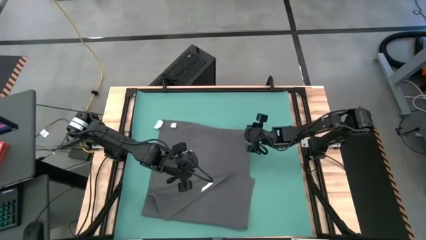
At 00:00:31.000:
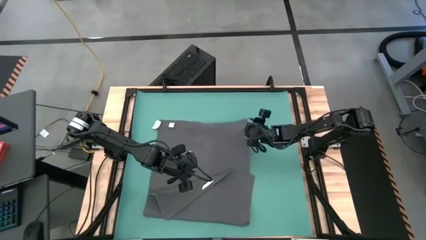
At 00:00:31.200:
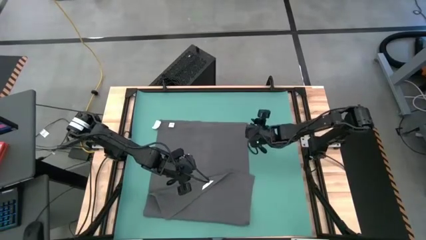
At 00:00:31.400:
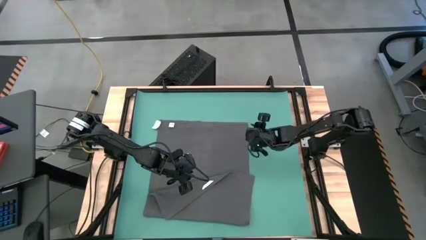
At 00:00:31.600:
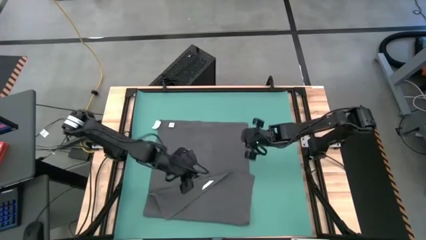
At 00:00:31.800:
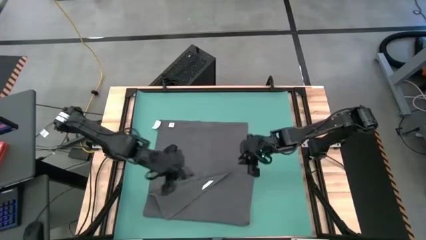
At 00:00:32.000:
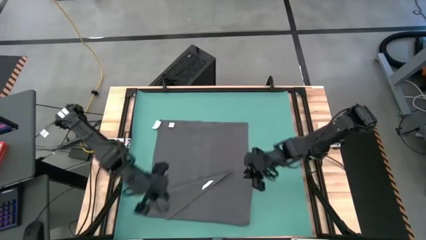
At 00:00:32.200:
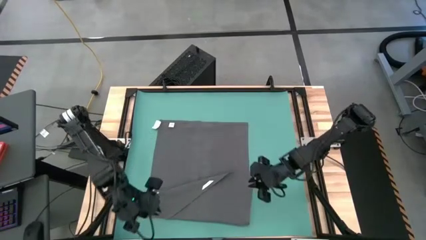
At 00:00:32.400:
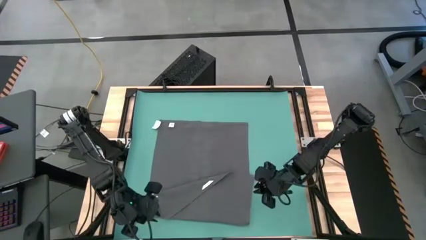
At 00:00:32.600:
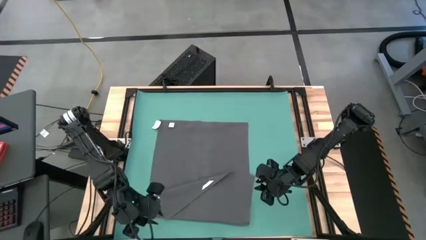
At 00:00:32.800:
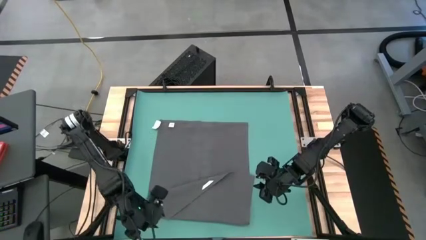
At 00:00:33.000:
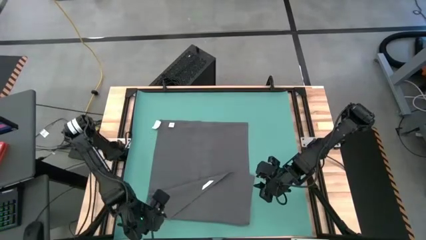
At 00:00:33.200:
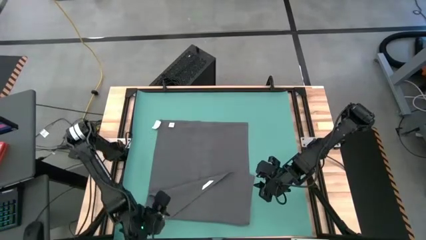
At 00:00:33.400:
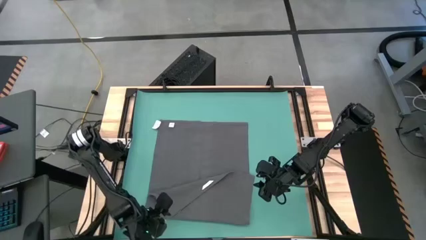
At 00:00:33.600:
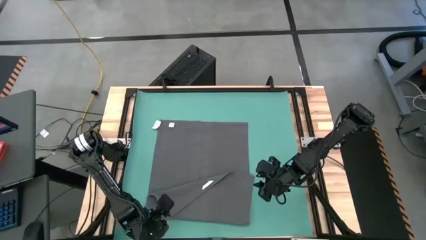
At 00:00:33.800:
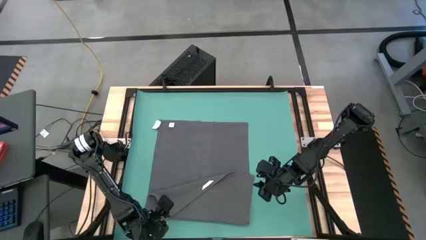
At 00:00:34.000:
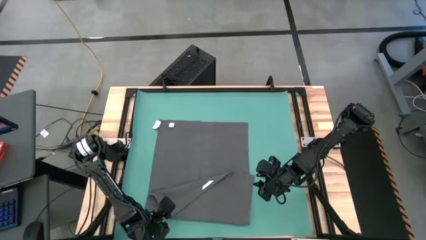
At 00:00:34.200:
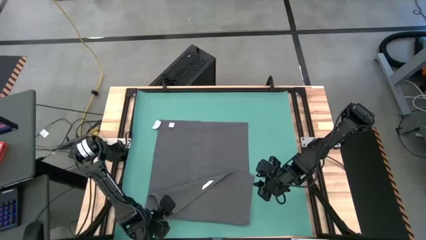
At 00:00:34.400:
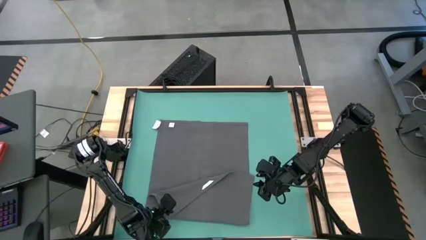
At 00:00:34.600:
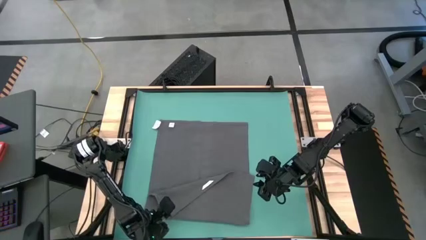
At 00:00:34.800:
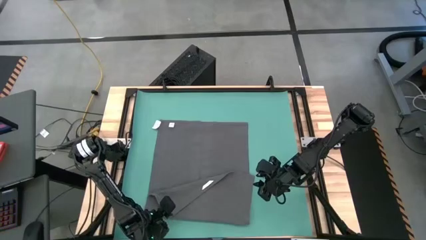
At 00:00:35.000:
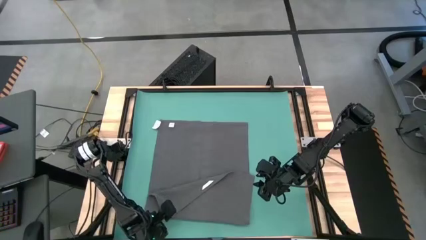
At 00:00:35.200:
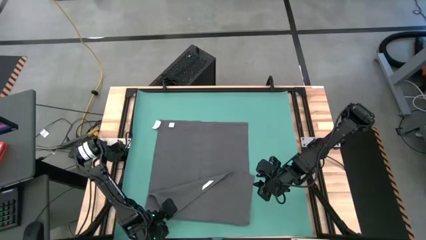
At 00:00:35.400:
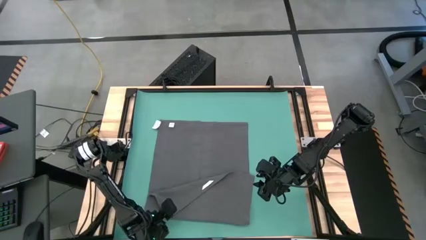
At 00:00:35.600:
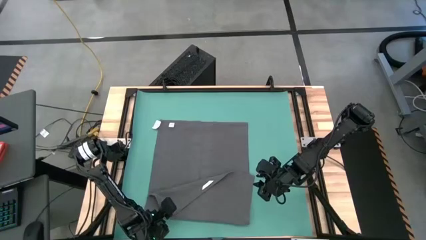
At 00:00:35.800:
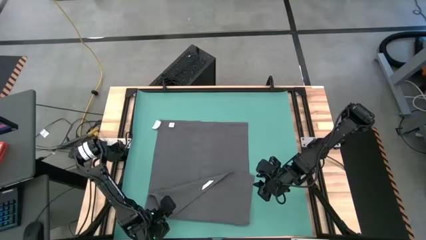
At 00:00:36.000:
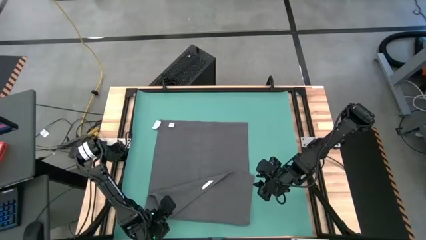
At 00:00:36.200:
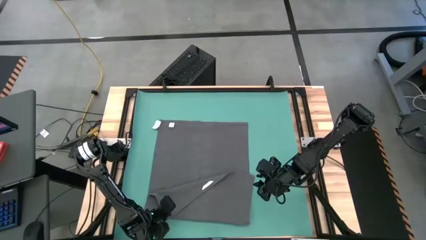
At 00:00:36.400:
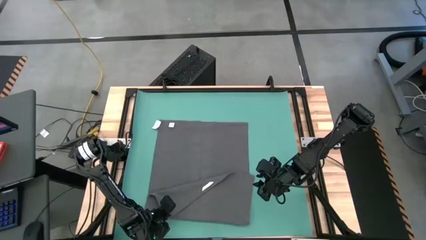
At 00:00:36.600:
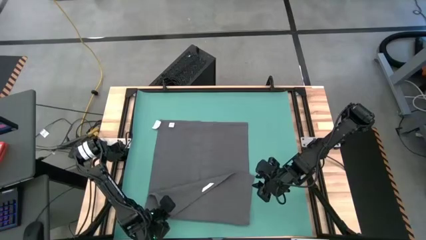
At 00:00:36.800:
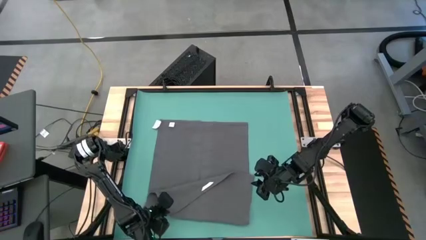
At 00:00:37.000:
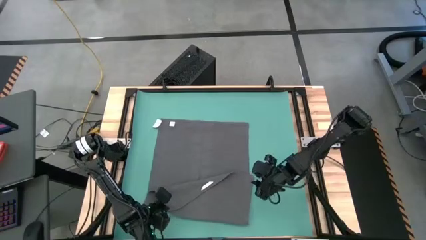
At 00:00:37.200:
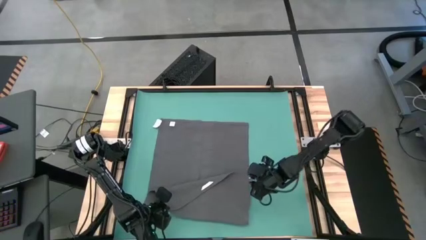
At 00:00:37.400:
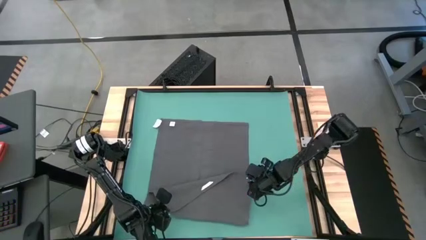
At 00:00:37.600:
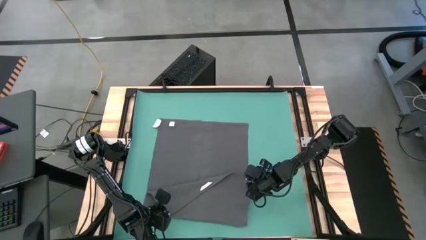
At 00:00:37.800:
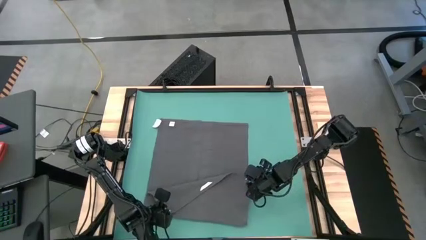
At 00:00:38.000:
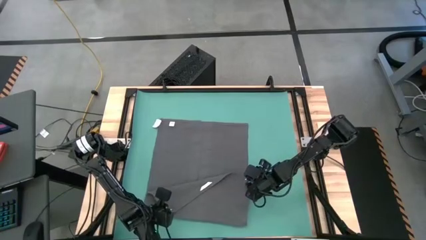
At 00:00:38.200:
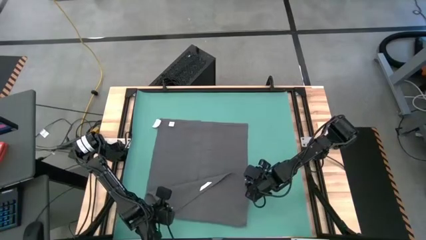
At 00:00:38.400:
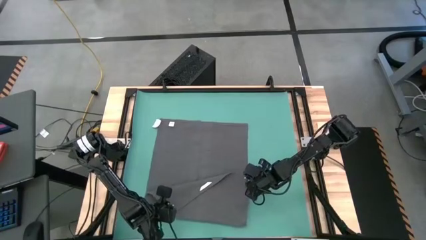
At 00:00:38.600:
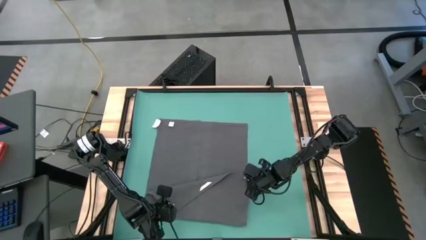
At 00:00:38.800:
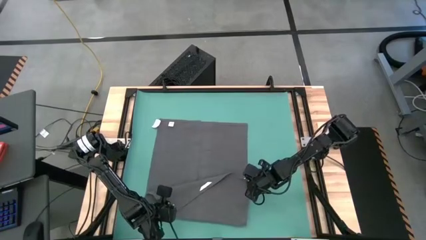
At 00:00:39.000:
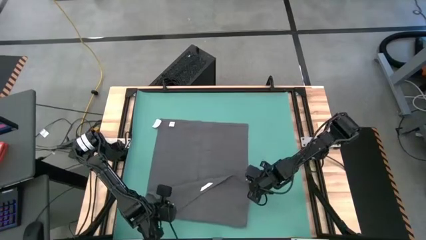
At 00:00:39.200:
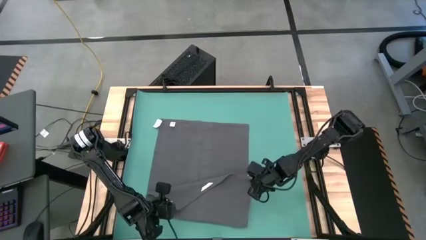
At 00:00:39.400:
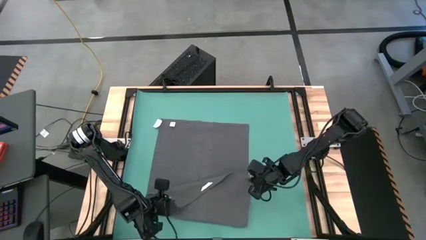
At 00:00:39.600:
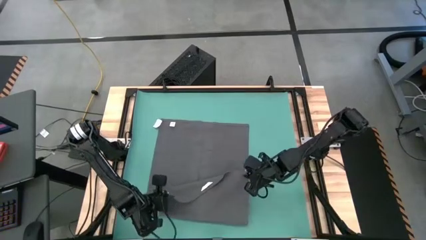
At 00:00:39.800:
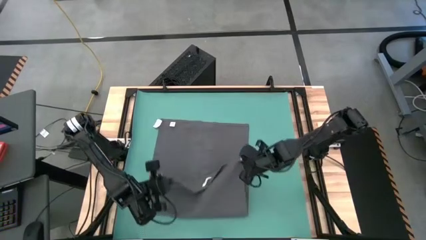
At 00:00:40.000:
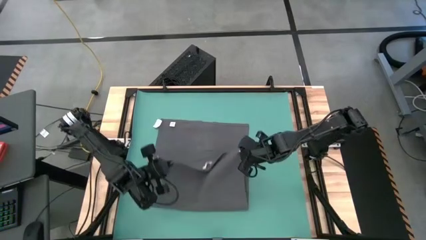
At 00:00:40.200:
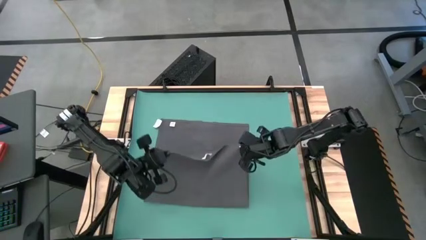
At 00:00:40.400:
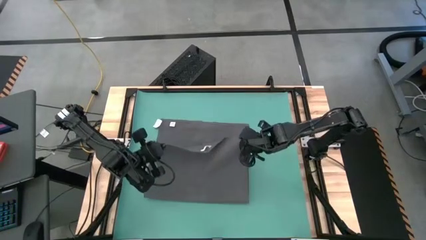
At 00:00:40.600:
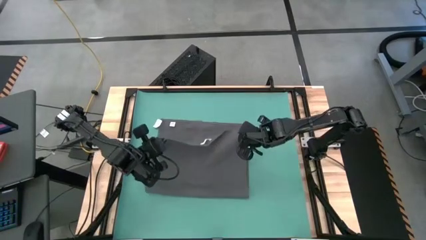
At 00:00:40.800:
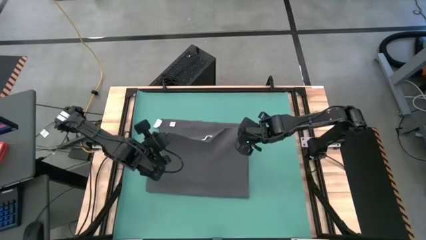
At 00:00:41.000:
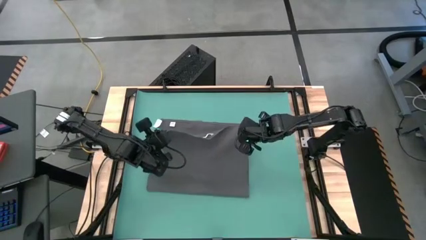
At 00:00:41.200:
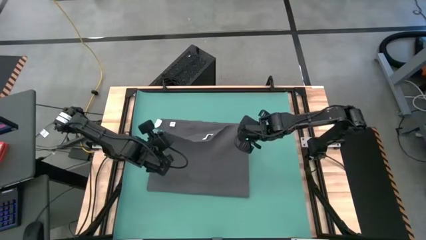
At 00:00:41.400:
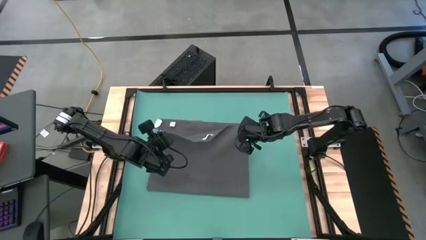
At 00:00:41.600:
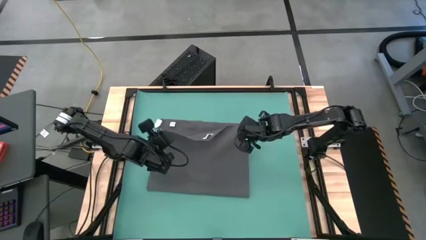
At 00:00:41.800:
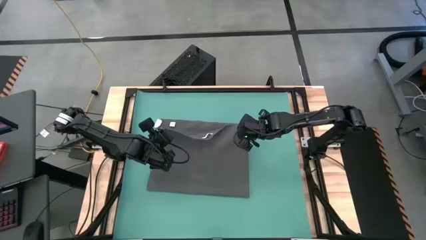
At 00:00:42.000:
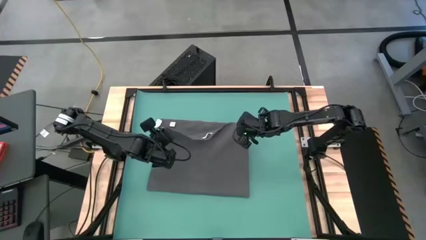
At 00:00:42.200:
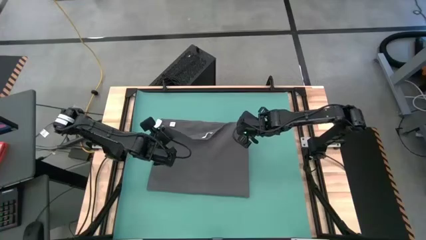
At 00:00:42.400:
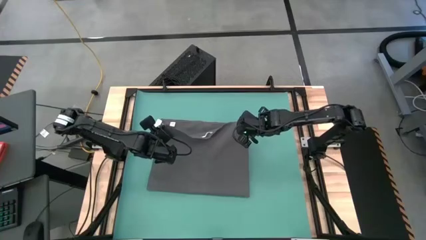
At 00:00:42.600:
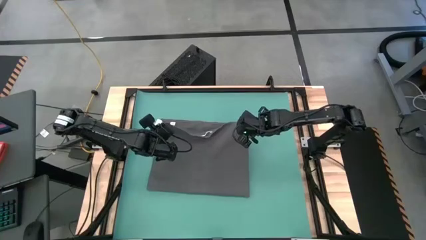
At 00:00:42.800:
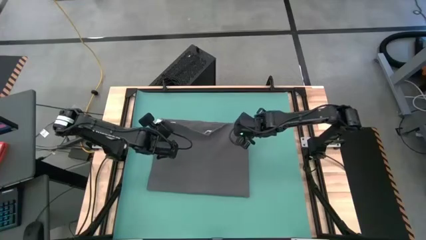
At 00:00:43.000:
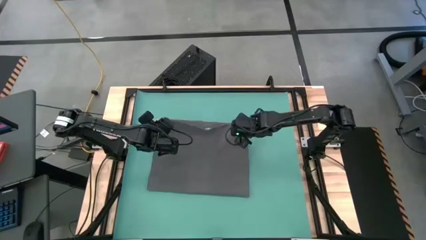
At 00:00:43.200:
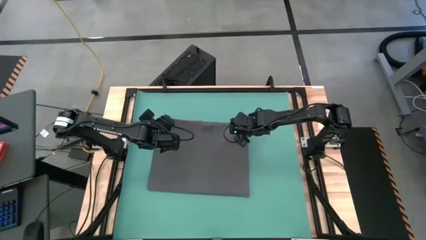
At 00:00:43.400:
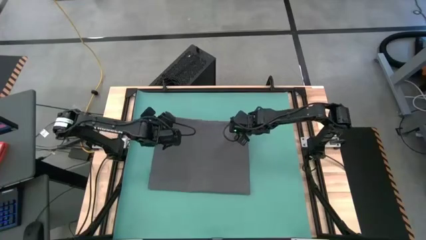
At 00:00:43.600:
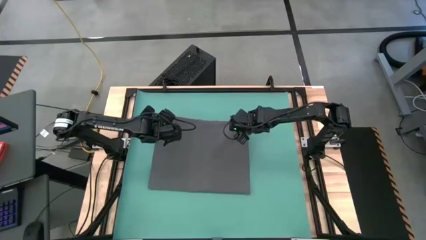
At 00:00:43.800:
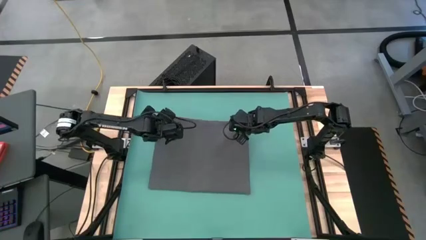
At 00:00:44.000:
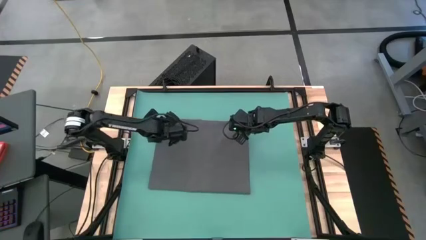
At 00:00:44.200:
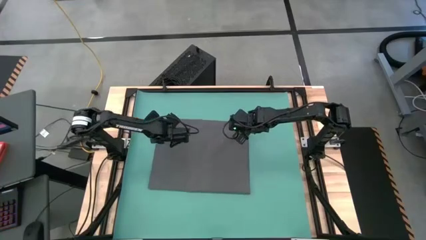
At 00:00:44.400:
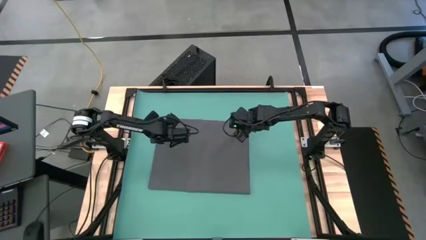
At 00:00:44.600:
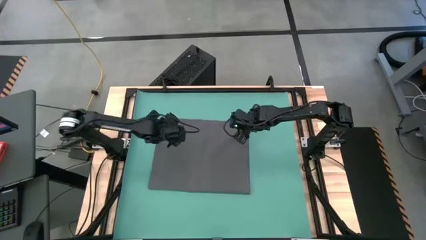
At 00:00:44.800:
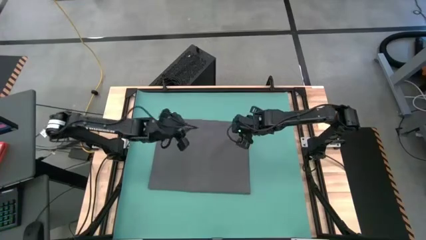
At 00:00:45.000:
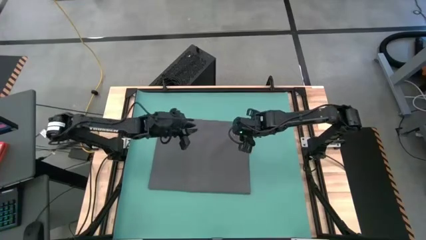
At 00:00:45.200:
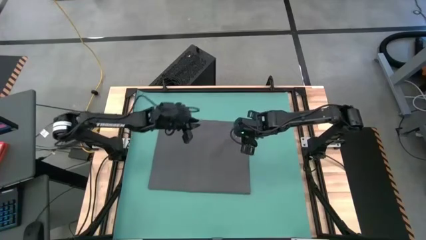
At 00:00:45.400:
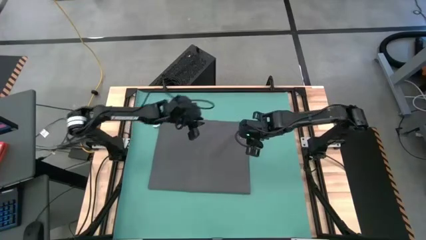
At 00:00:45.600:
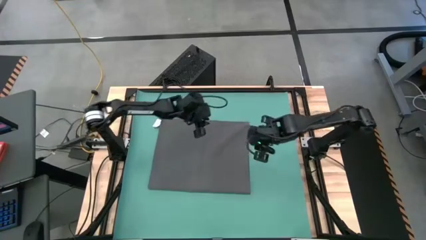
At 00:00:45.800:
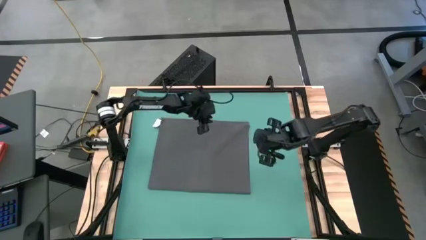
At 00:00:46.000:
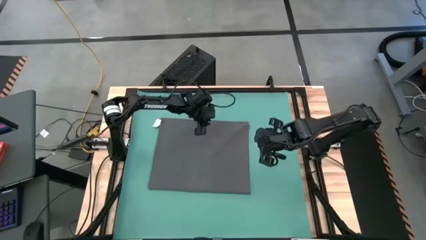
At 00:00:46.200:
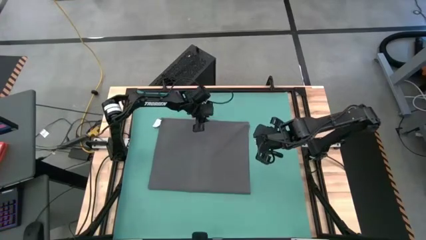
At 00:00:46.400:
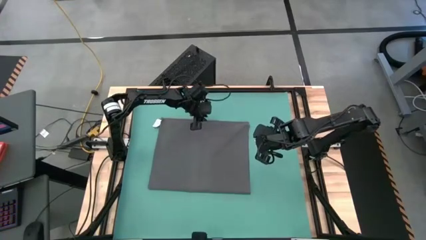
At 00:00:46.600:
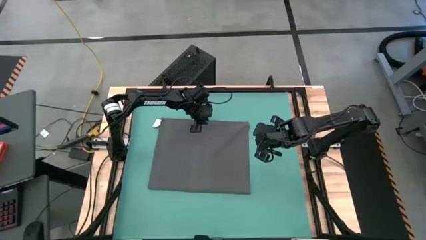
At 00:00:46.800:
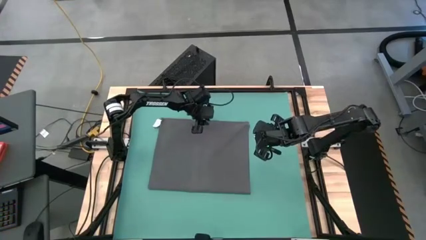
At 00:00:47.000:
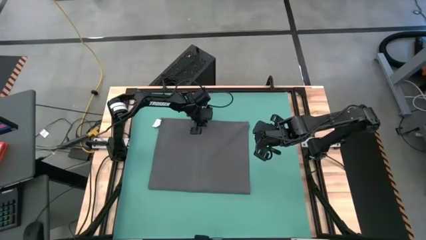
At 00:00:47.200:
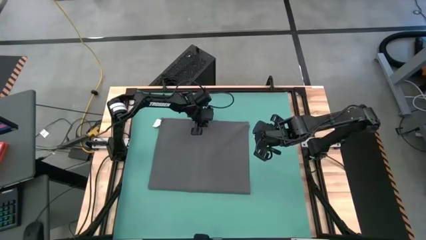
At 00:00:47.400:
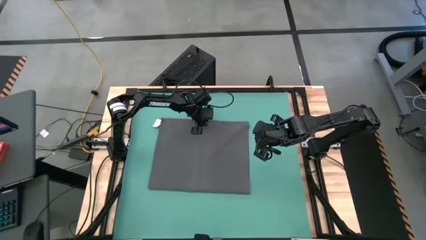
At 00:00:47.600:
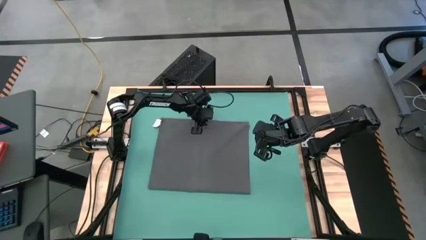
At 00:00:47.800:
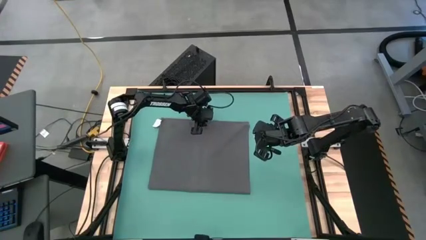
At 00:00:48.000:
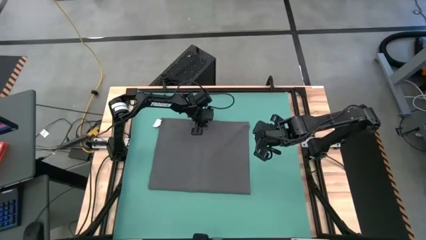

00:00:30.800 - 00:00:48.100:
Task: Roll towel
Roll the gray towel on the table
